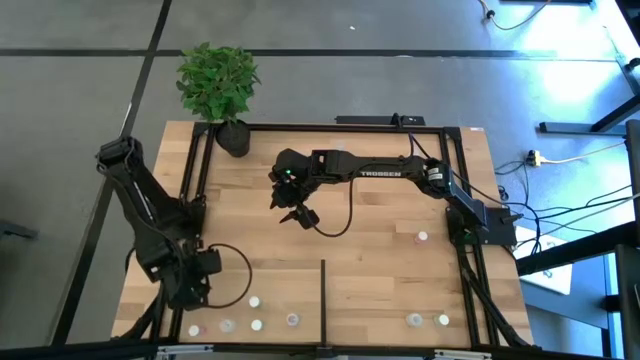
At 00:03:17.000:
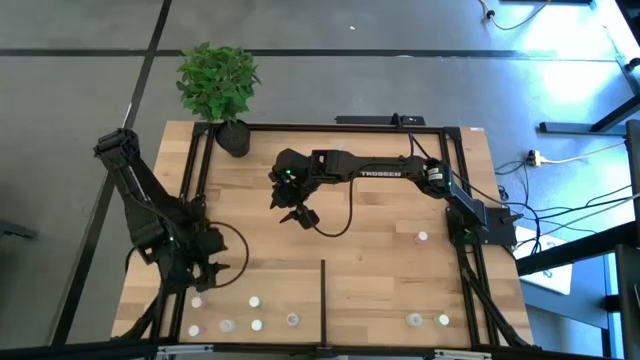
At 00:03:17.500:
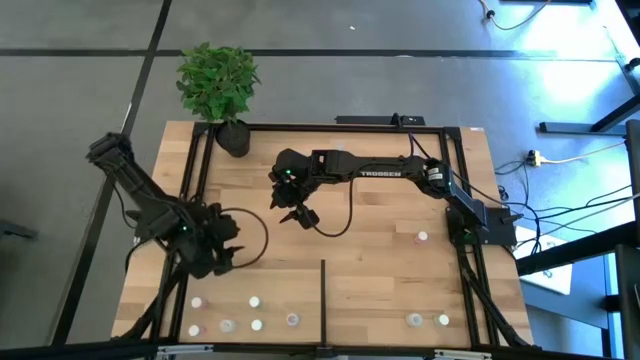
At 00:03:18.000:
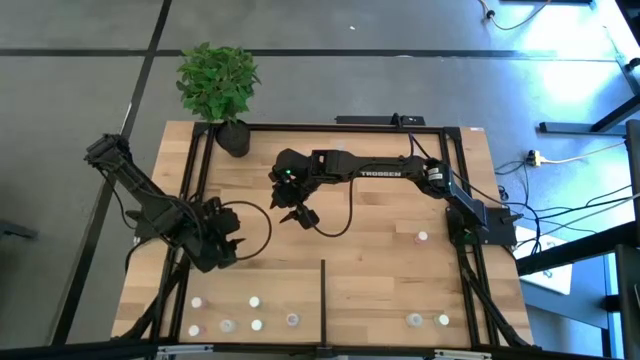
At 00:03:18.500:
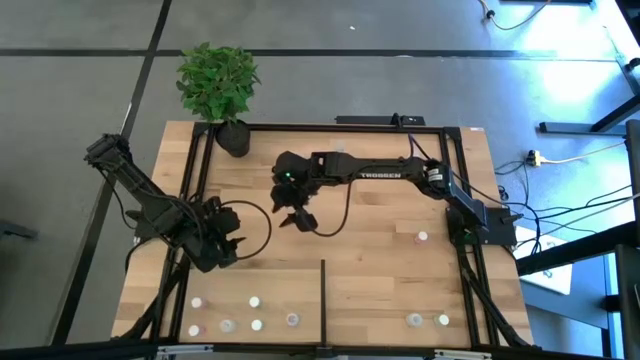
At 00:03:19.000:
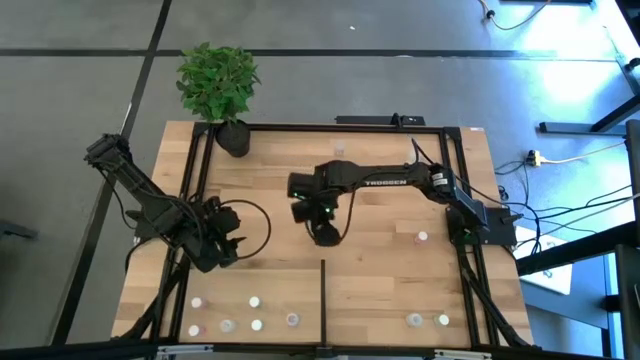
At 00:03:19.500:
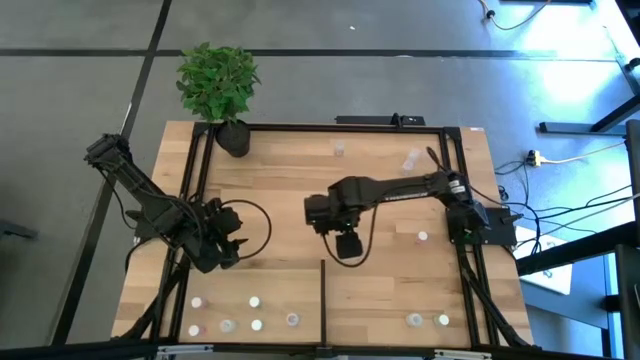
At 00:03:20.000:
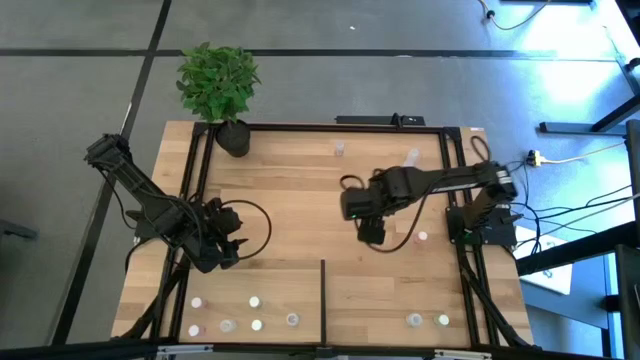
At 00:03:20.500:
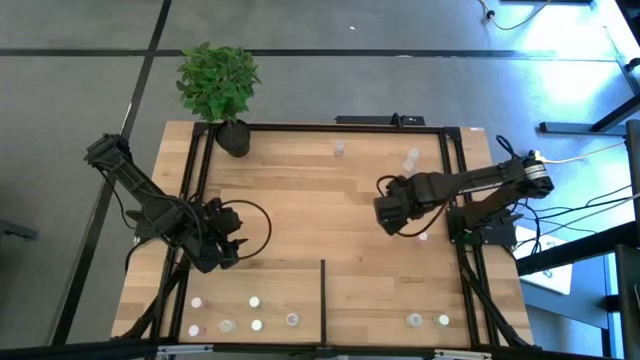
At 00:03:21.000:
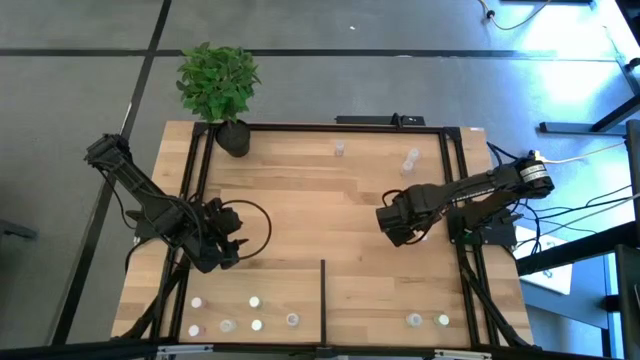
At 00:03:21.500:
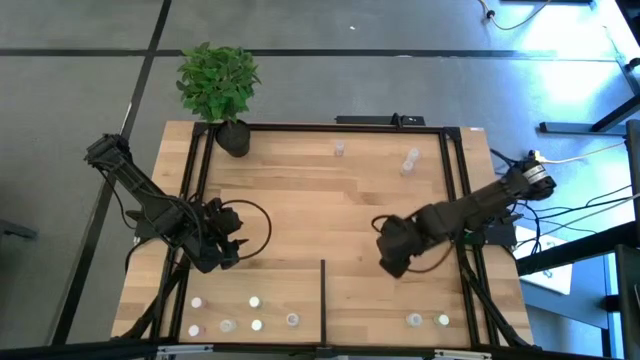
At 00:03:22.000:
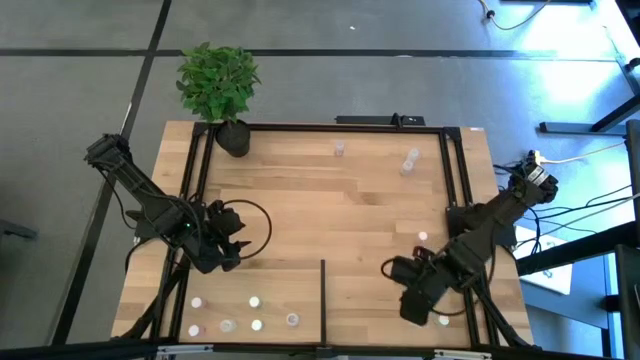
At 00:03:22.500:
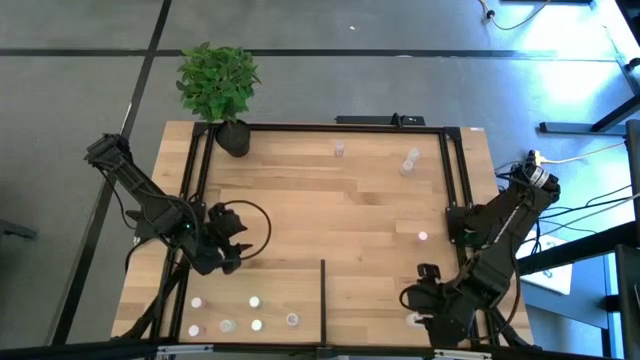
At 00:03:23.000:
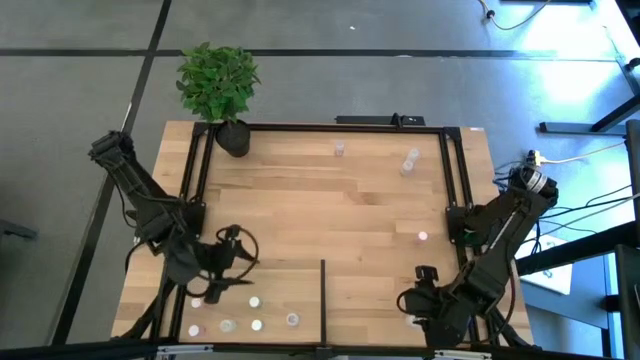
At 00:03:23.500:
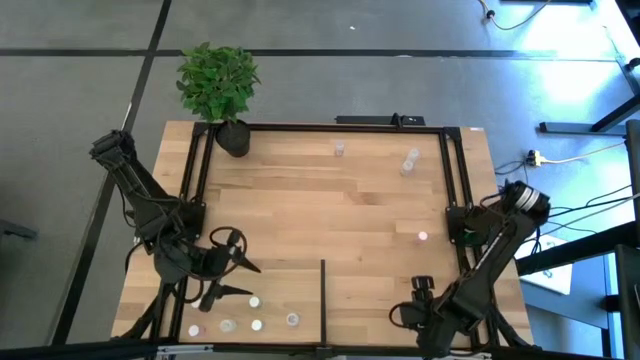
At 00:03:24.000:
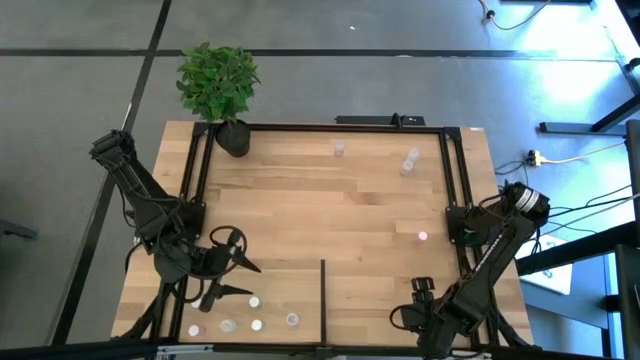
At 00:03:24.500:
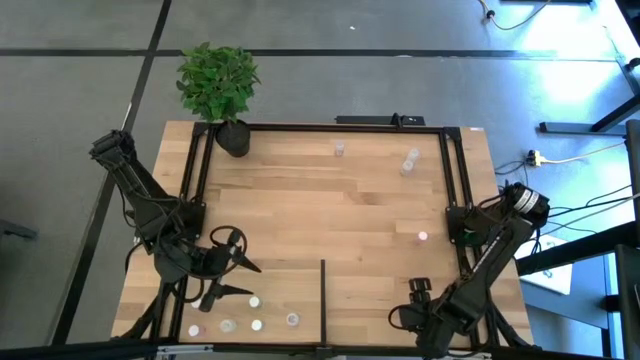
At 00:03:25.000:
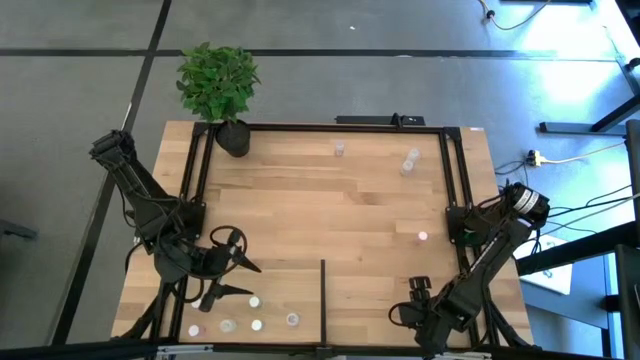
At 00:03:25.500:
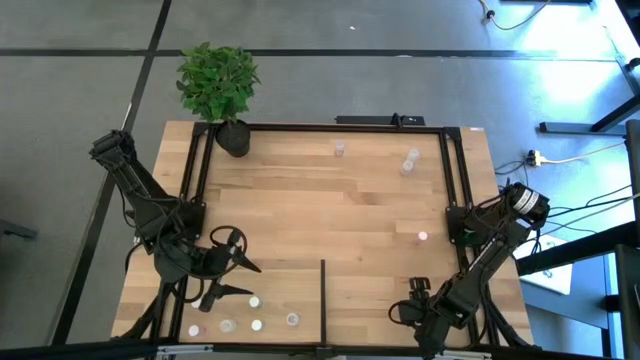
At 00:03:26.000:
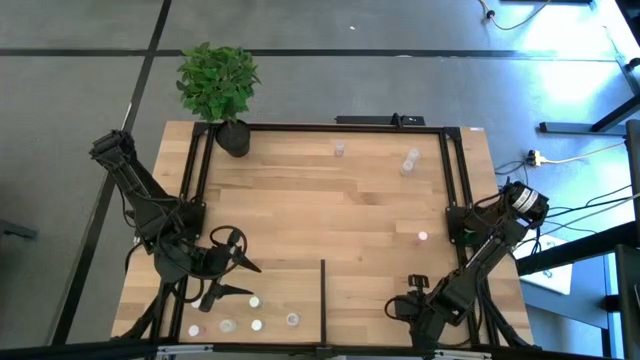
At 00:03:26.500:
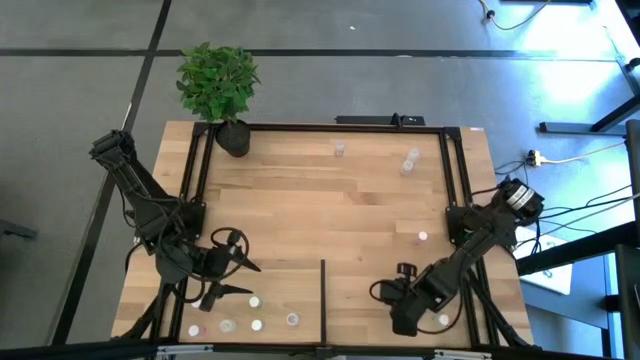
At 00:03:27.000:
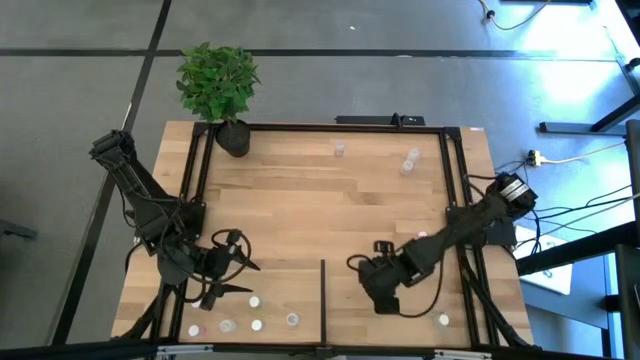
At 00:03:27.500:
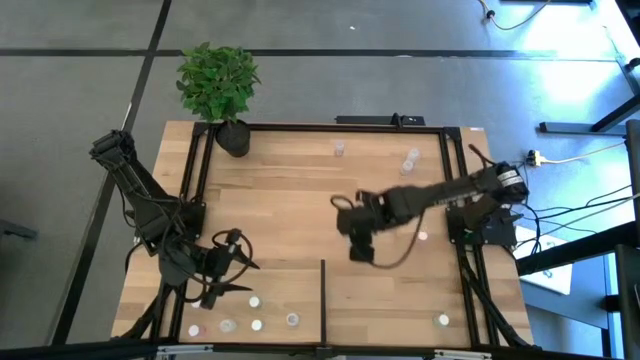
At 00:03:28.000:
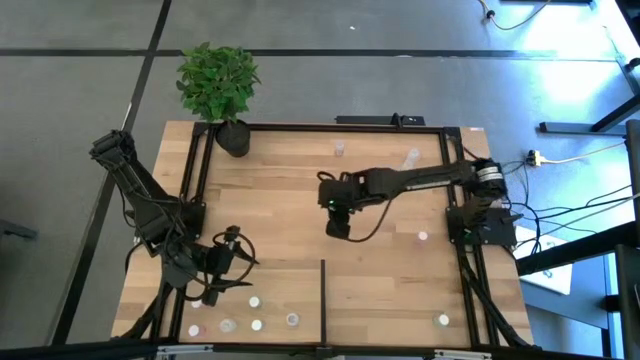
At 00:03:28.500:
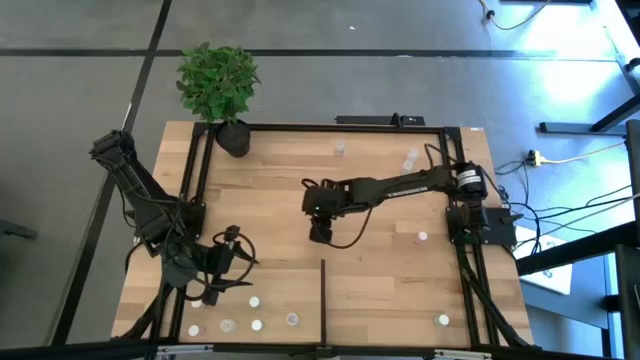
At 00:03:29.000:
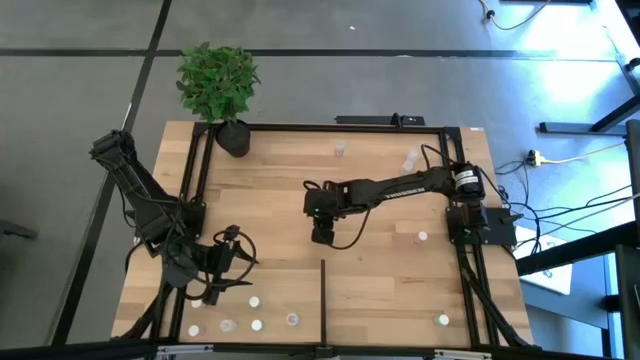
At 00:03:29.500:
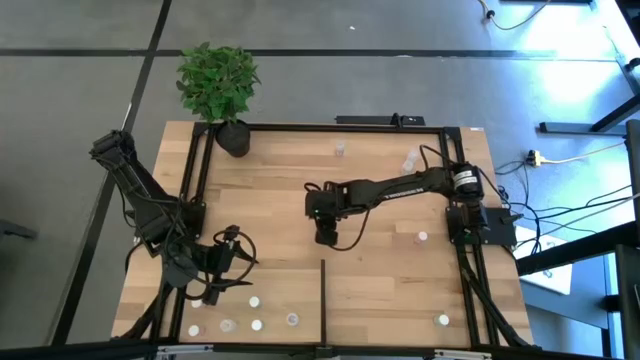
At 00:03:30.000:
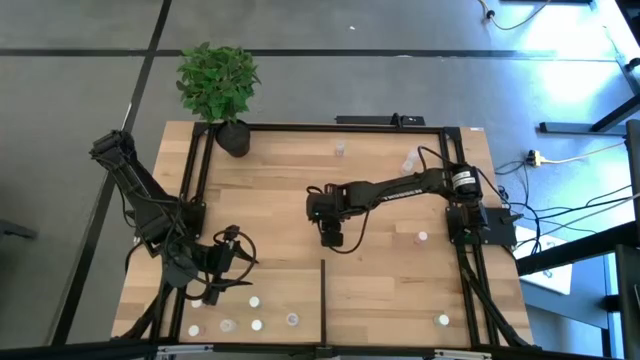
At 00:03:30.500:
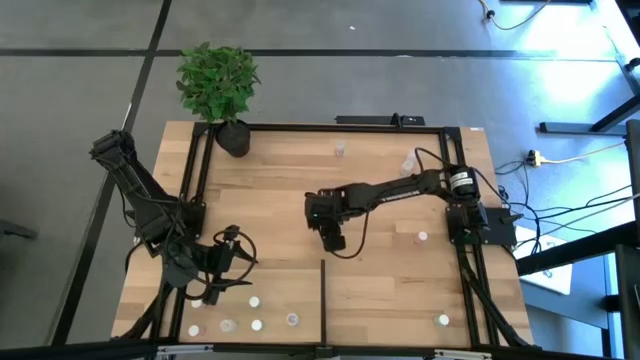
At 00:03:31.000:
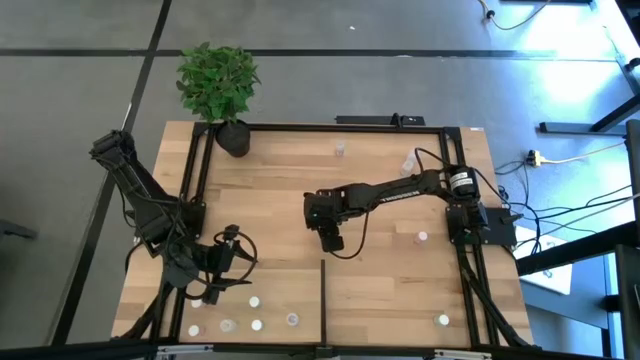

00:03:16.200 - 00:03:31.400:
Task: Pick and place medicine bottles onto shelf by color
Put the bottom white pill bottle on the shelf aligned with the other white pill bottle

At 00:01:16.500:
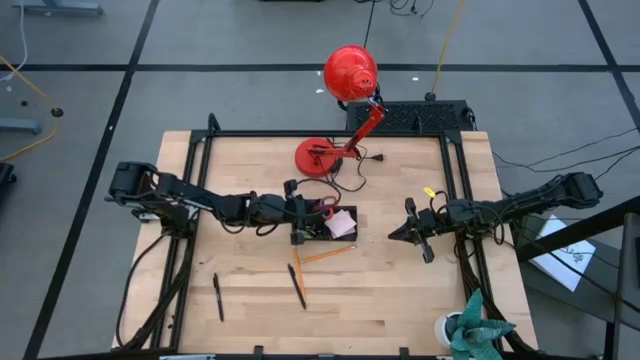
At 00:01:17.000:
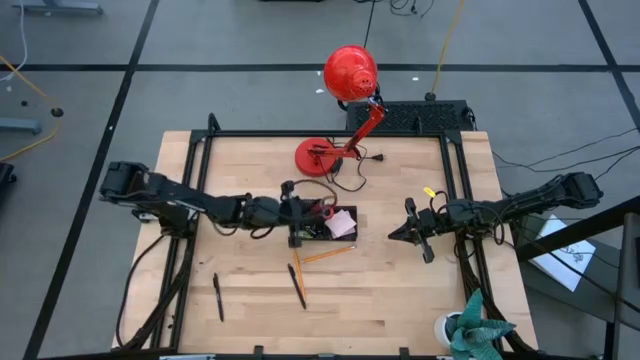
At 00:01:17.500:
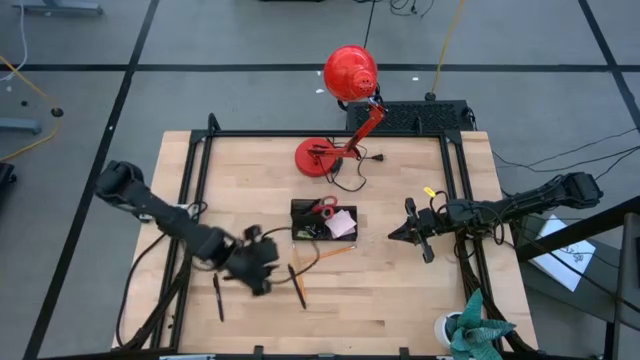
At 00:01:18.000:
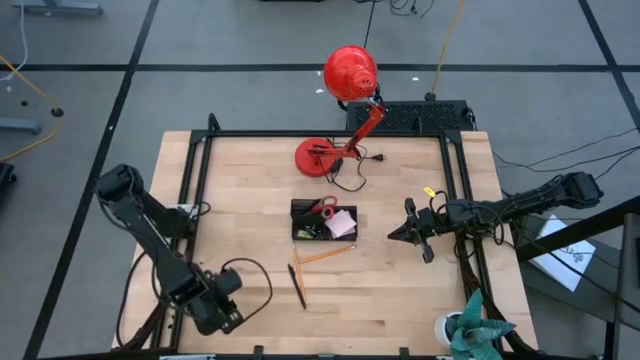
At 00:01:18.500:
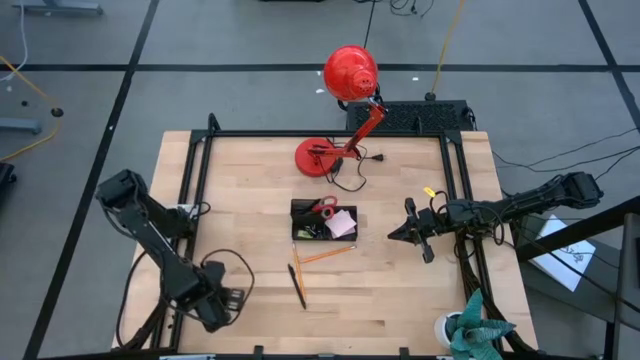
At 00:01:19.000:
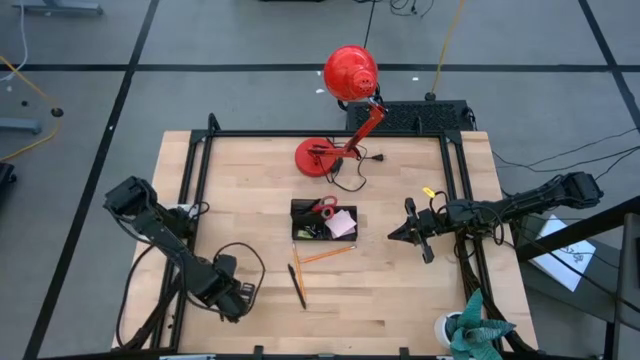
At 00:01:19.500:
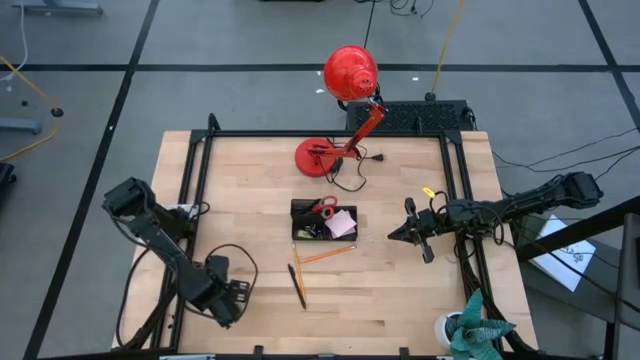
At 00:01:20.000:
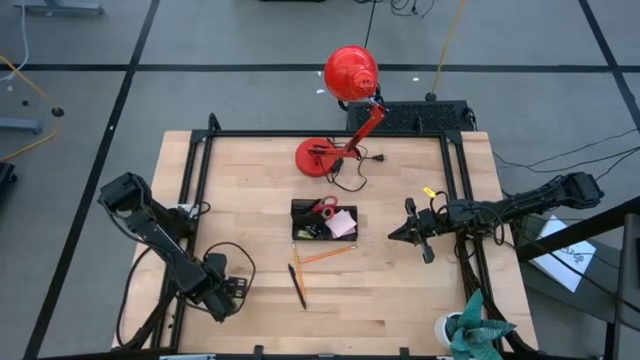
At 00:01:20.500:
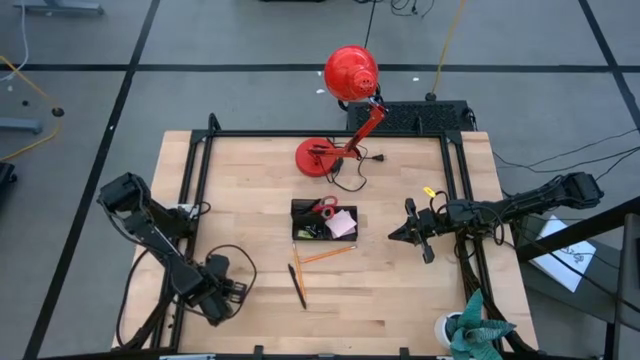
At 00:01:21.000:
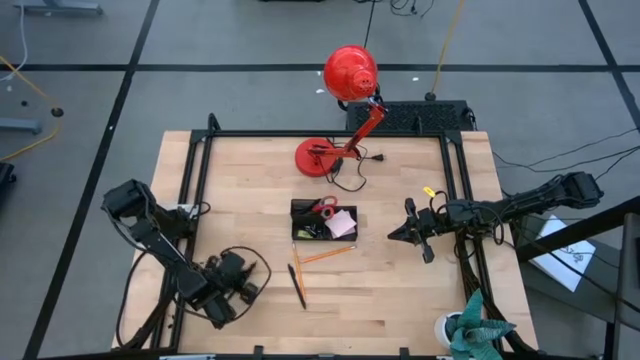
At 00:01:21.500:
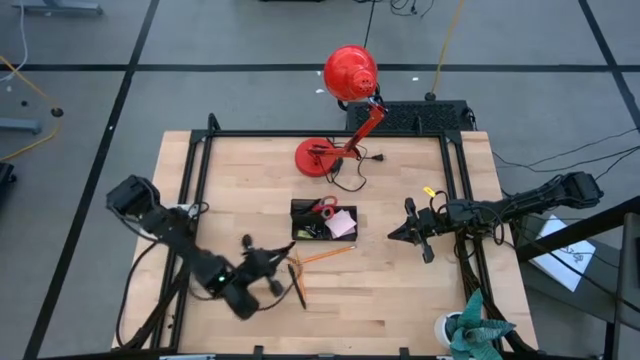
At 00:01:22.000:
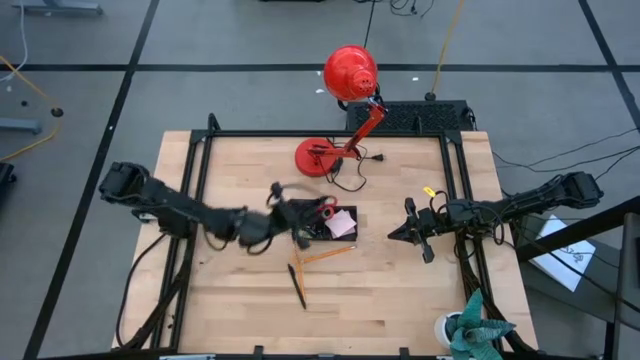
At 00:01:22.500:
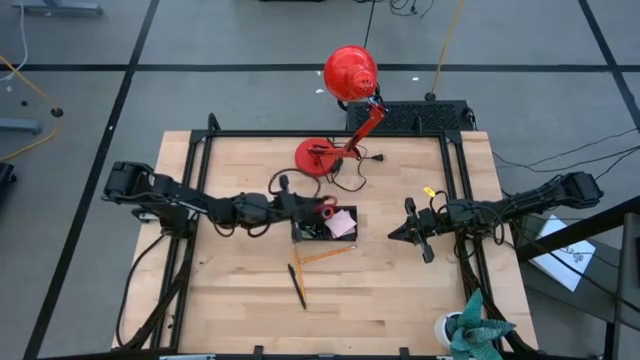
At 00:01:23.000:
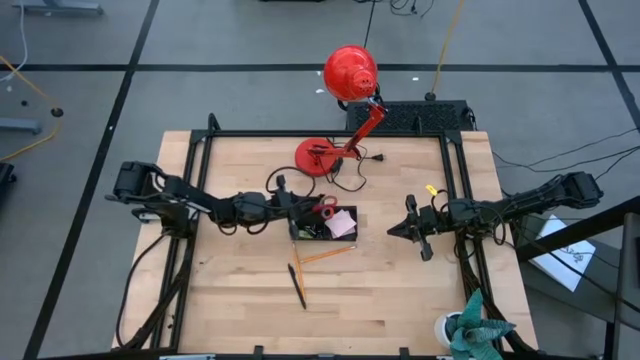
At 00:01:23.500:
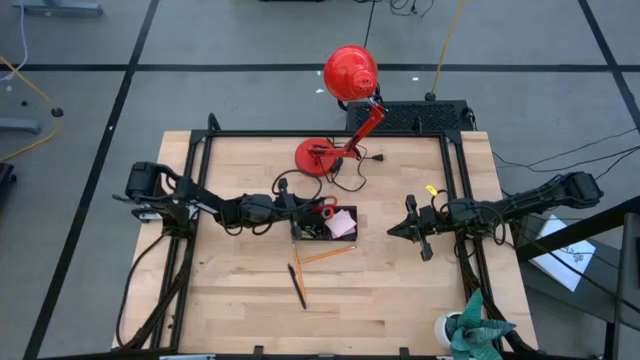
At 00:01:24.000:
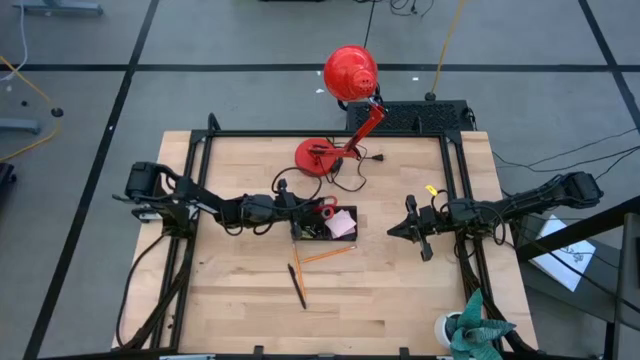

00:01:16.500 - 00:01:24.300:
Task: Pick and place office supplies into organizer
Put the left black pen into the desk organizer
